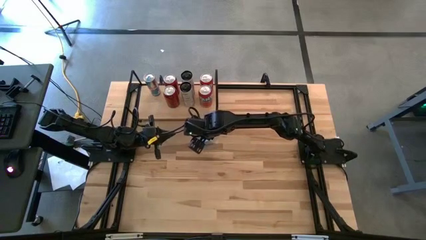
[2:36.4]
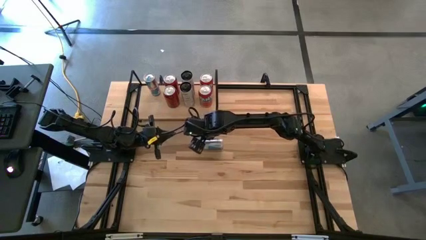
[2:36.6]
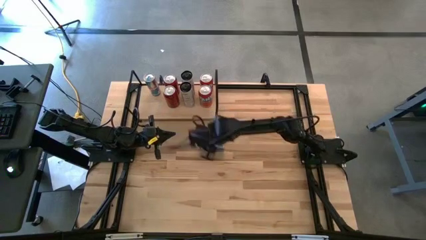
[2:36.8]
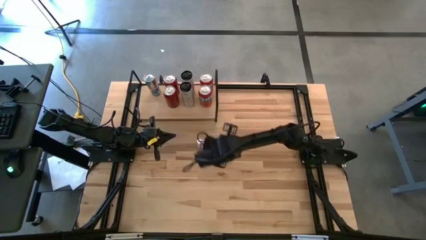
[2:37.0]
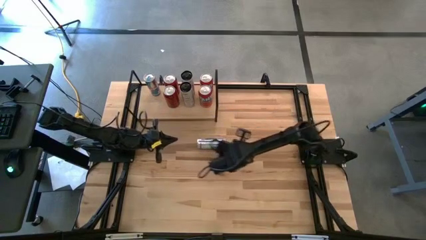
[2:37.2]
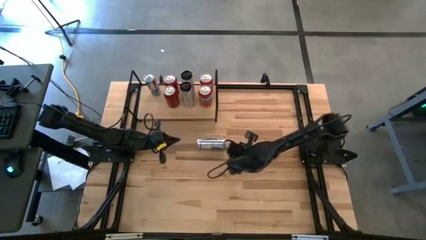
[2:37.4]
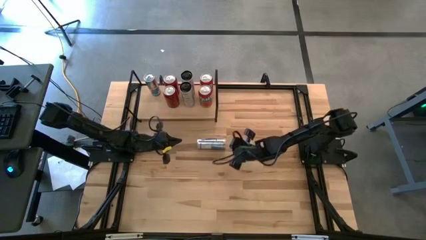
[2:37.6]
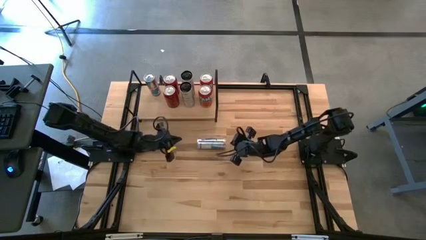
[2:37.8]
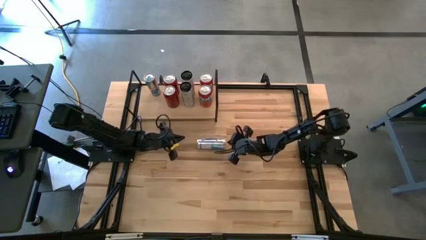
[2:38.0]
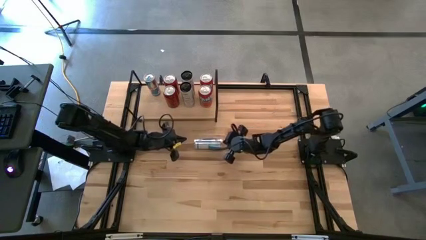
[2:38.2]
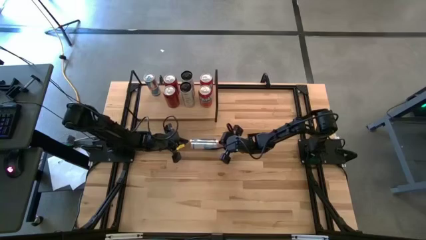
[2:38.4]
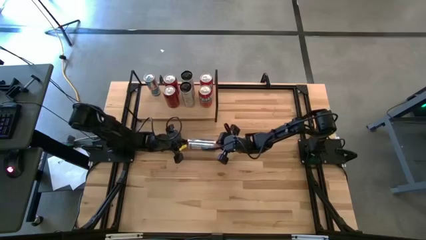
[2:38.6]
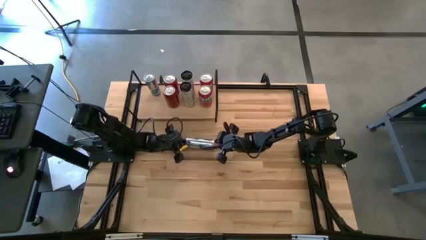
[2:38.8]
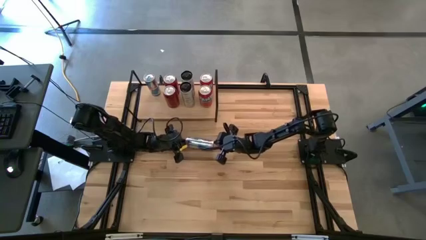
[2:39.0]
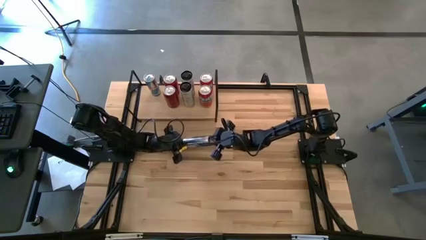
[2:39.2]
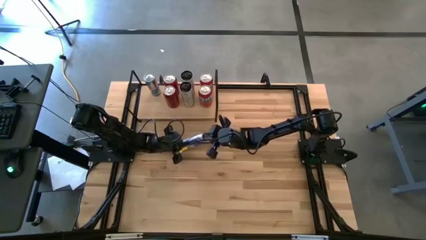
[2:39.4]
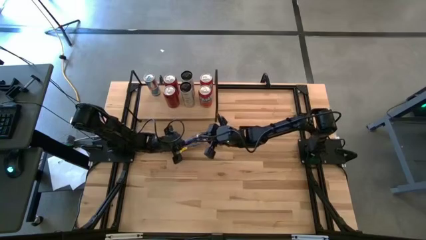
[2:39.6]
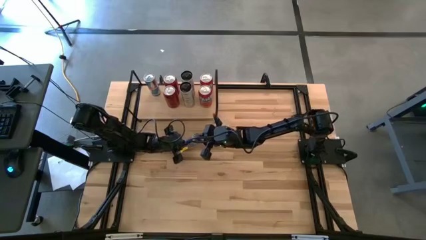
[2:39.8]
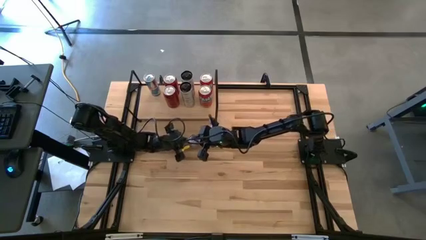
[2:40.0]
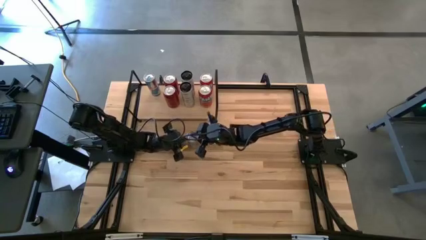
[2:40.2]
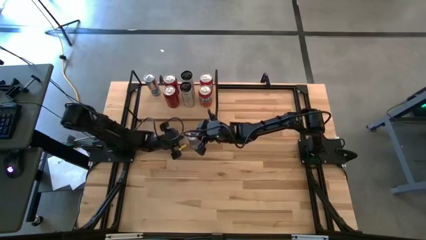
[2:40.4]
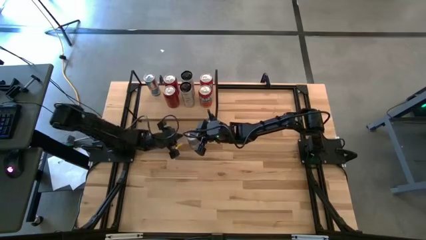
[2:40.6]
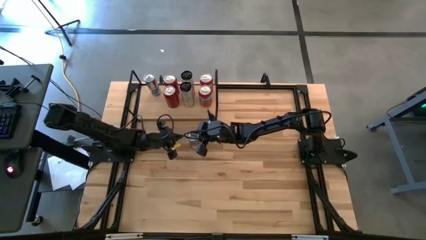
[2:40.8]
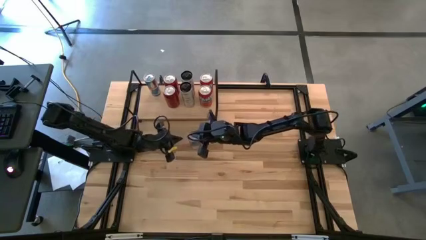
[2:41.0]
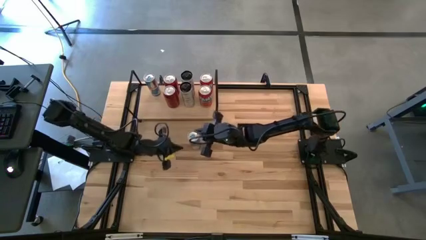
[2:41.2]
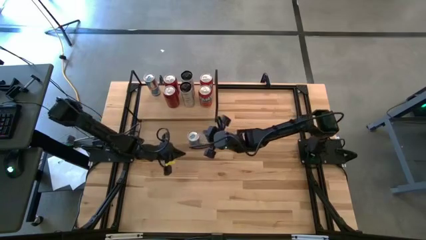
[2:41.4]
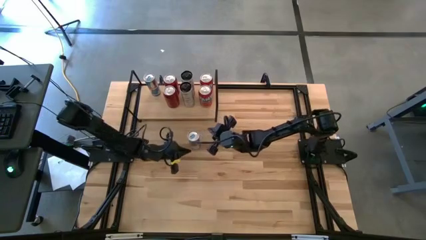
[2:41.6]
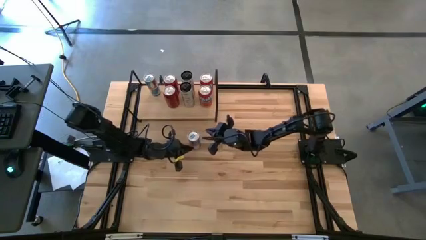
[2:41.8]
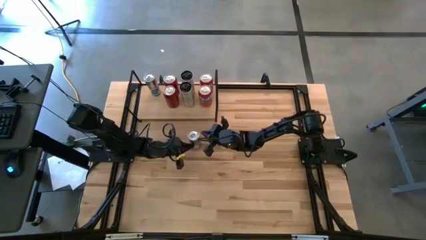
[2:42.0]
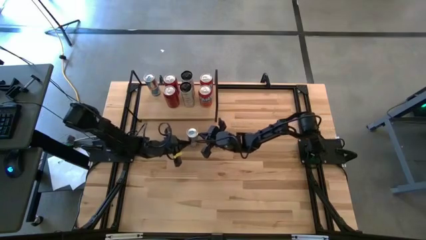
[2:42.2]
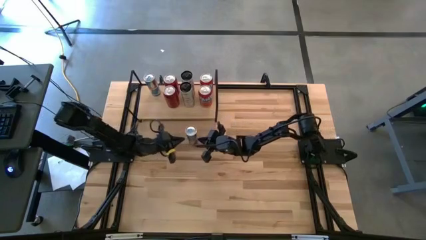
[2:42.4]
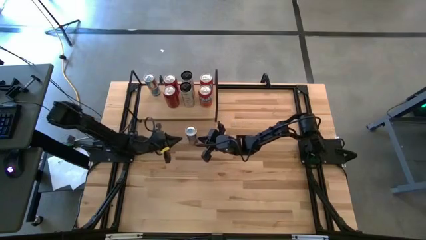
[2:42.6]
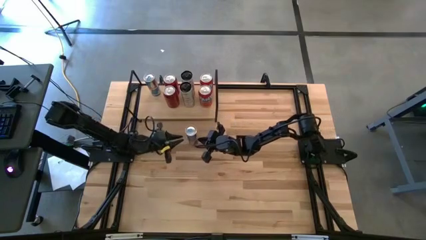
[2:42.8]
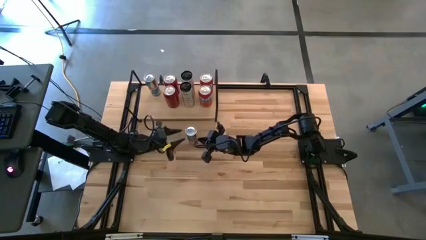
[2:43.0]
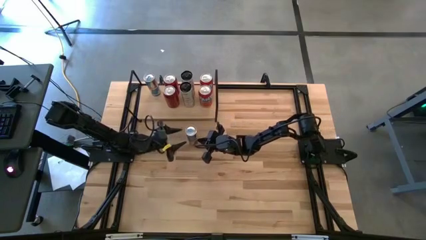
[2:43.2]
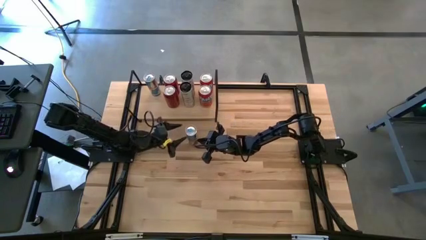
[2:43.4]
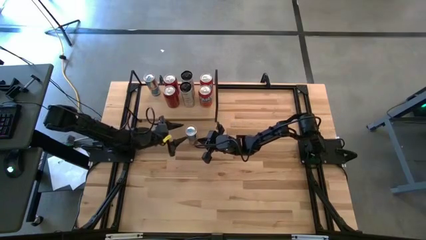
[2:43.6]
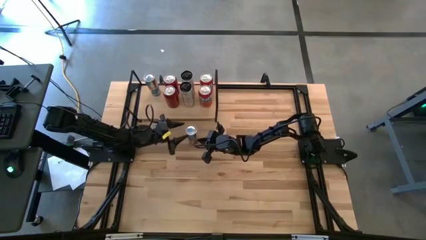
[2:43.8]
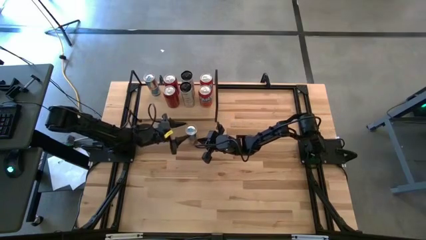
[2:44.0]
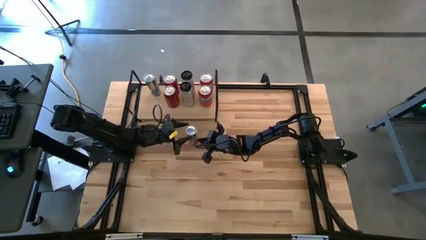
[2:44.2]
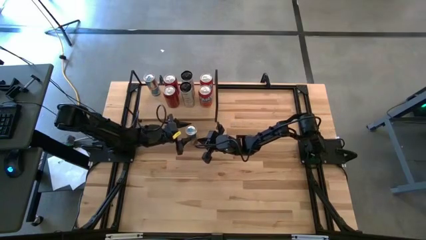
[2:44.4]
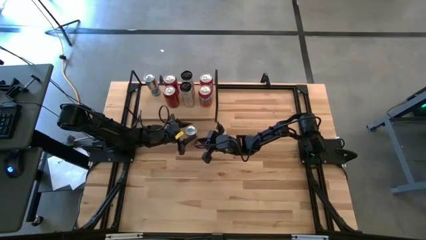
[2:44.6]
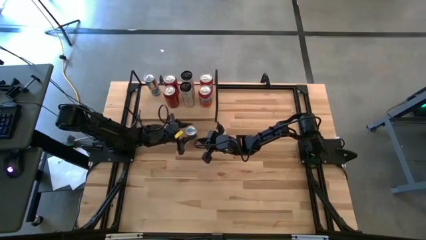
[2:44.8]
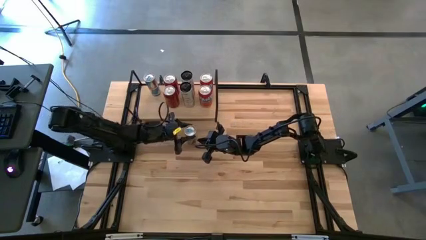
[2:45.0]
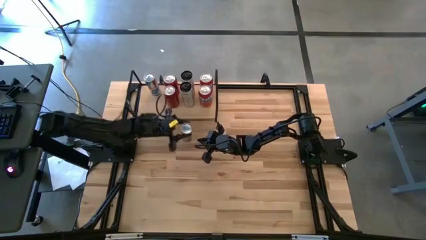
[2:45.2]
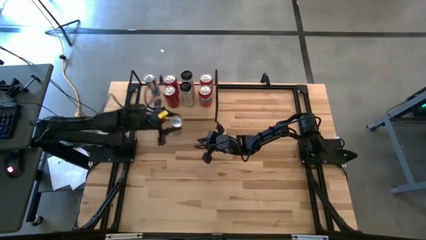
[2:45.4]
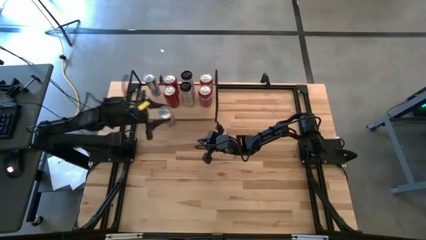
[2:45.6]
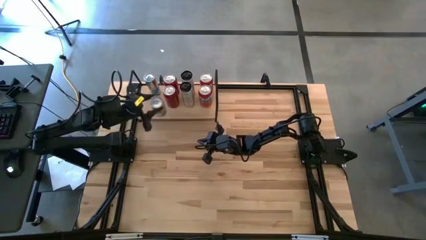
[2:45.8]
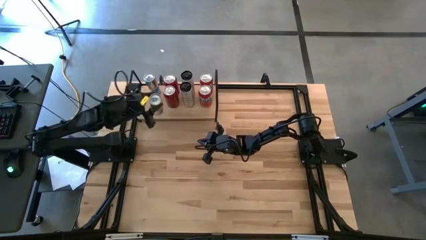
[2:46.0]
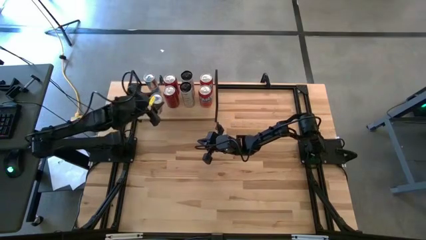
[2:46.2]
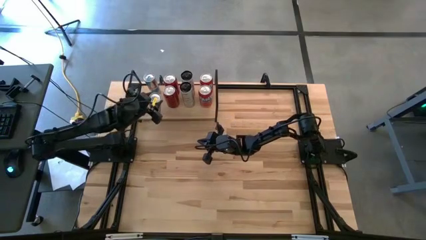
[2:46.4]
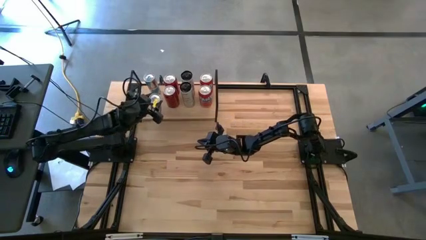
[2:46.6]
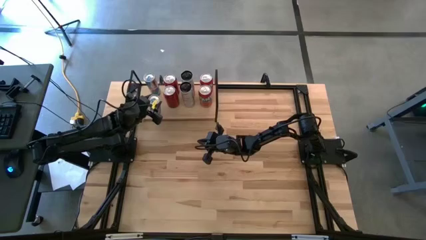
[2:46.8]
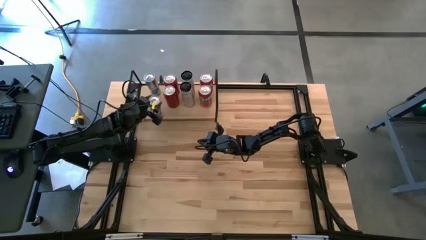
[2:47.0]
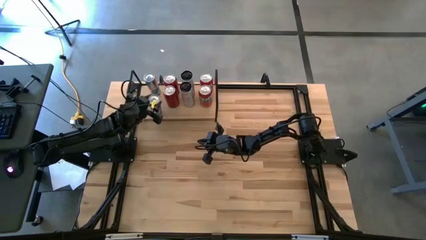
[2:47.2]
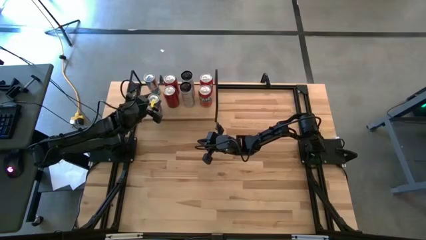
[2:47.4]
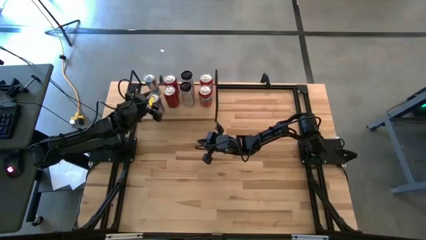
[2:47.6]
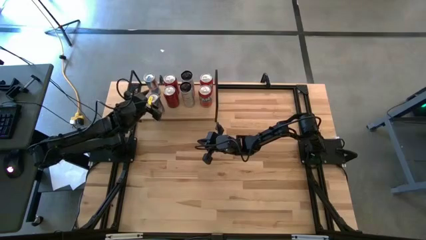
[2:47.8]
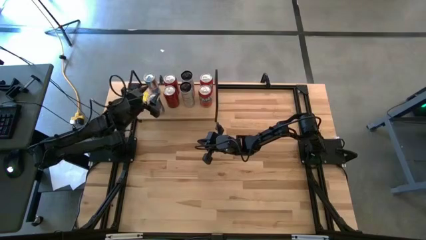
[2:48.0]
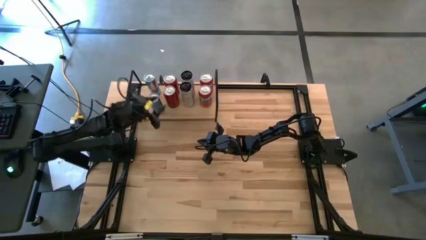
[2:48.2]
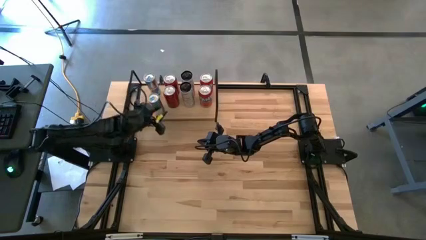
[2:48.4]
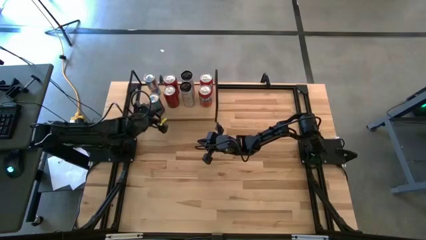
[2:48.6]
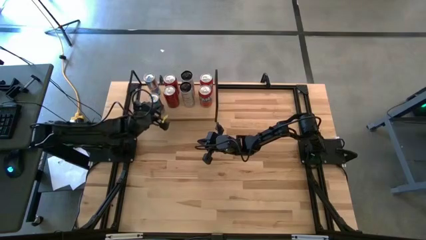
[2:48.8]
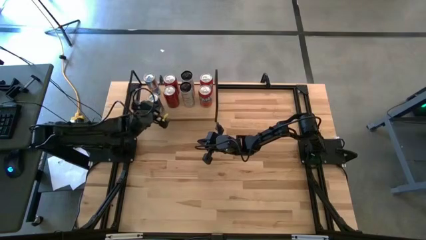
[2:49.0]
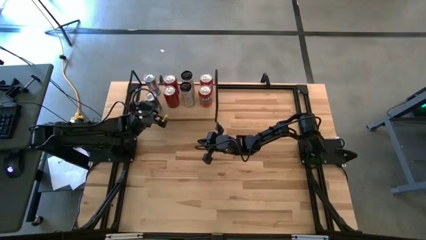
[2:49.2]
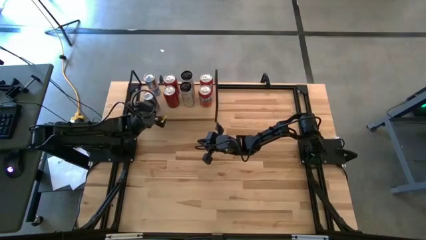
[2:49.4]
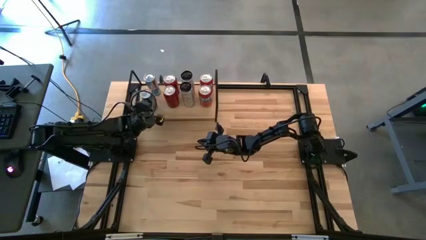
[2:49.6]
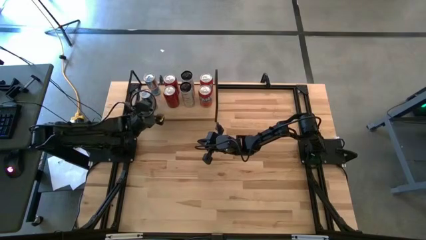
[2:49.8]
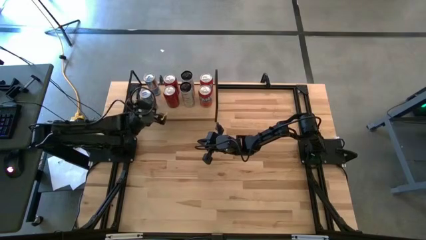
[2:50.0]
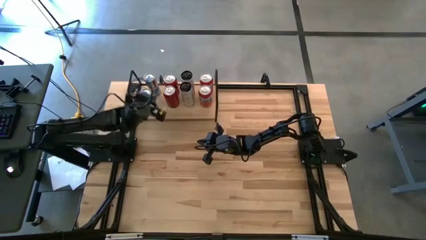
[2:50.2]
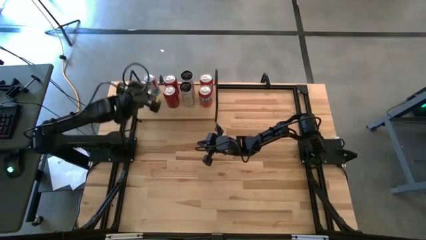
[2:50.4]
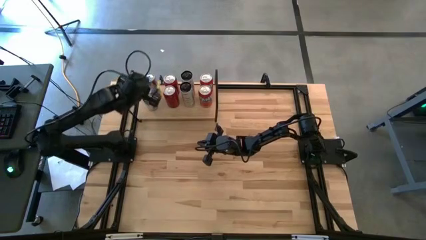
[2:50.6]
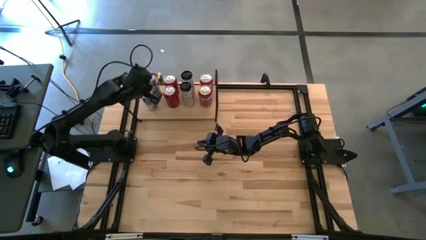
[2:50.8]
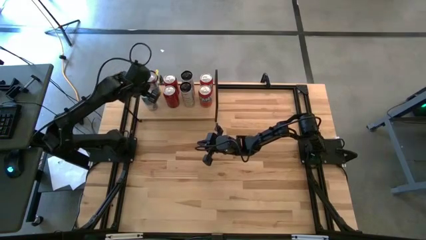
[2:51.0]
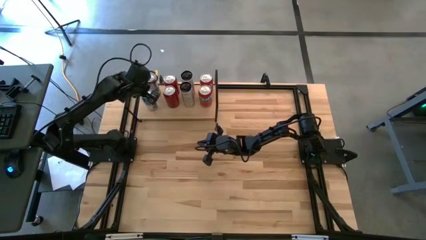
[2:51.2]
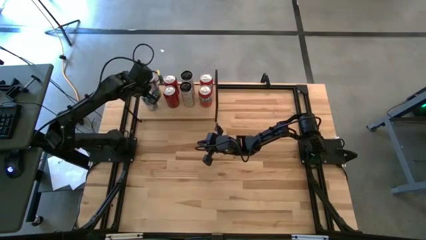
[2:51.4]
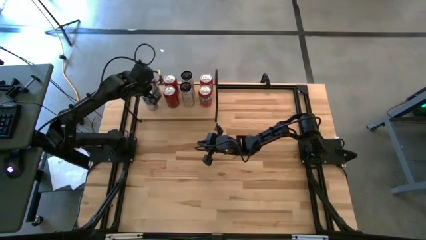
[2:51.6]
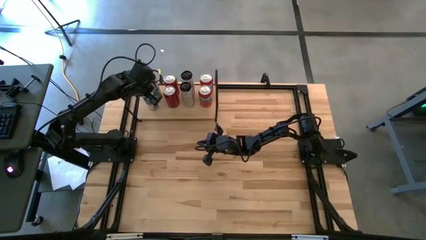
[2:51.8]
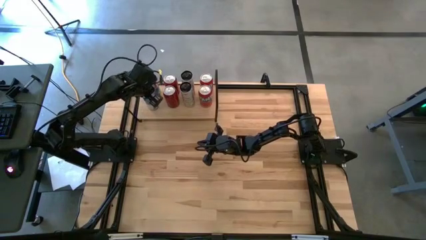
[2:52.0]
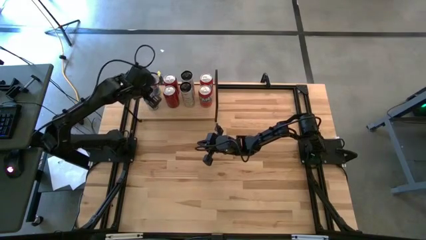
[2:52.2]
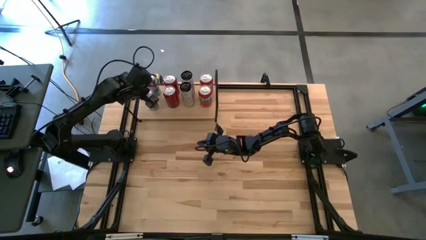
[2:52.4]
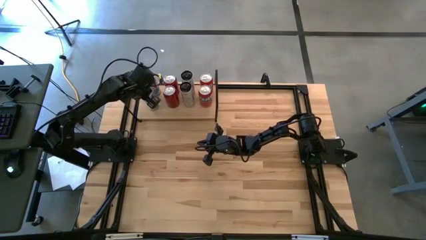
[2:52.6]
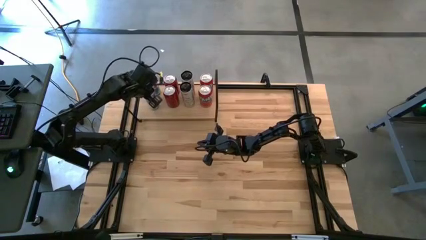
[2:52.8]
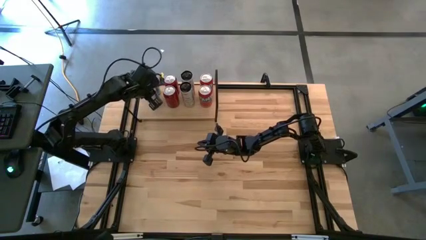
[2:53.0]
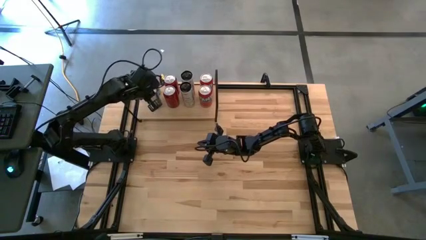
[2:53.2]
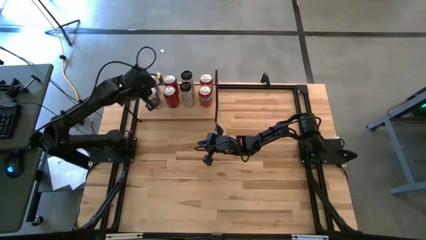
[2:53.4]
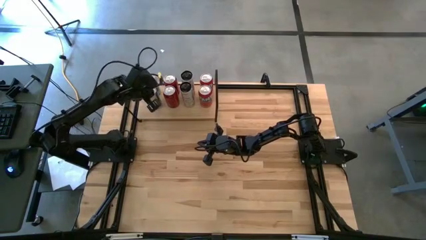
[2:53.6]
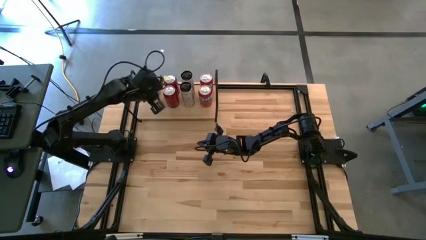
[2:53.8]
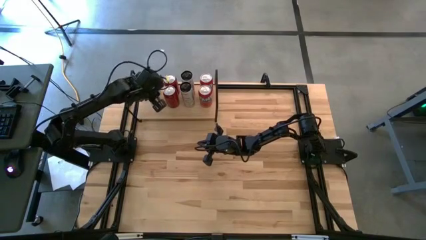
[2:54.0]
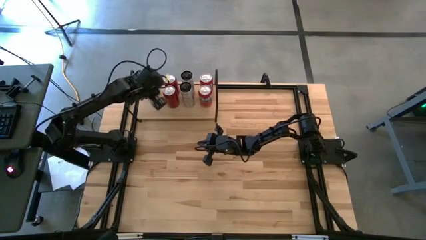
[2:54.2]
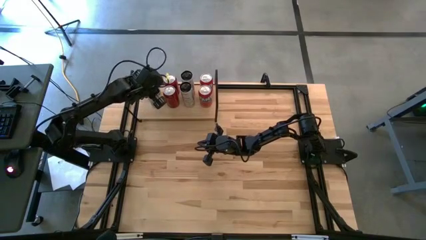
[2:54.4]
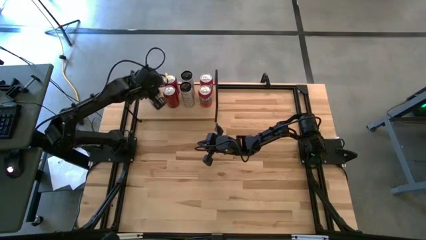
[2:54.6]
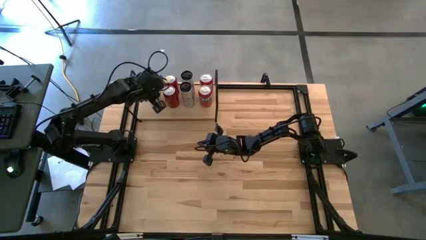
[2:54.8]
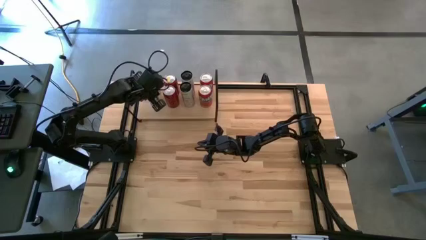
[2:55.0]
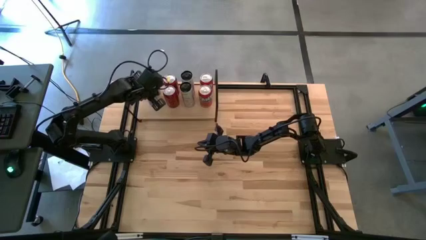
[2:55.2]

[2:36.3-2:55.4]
Task: Place canned beverage on shelf
Put the blue soda can aligned with the other blue soda can on the shelf
